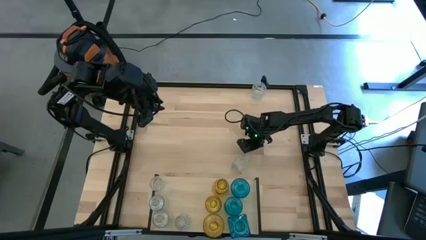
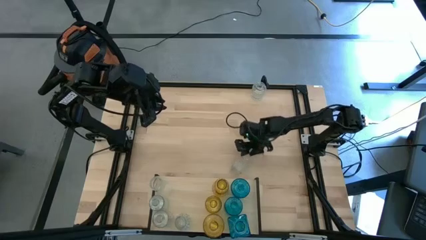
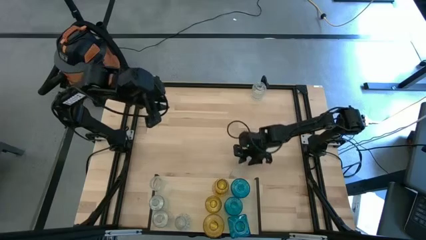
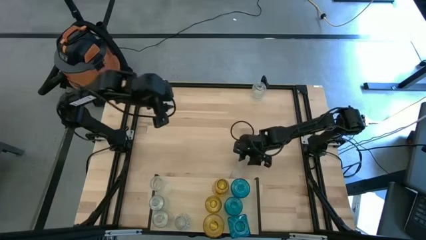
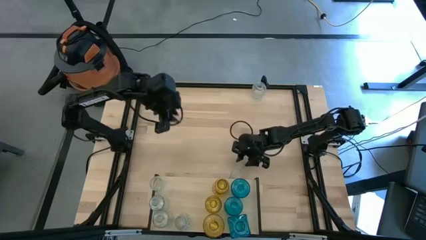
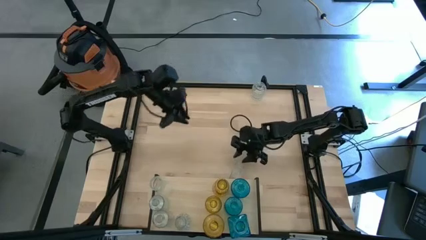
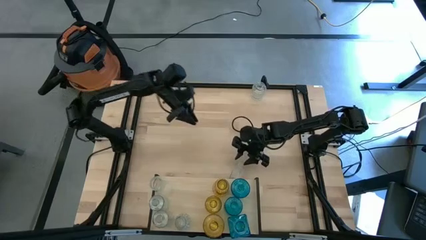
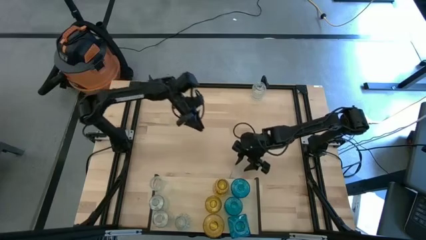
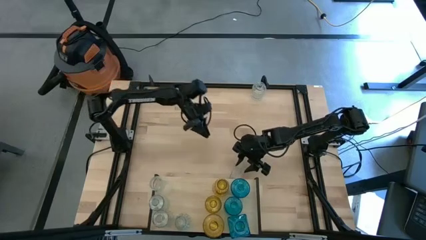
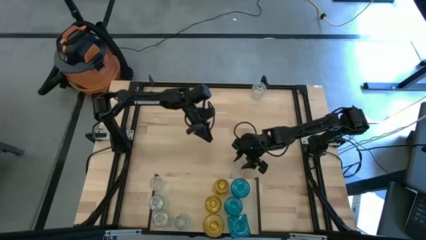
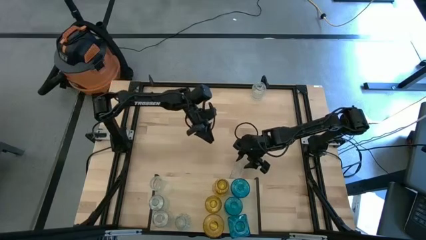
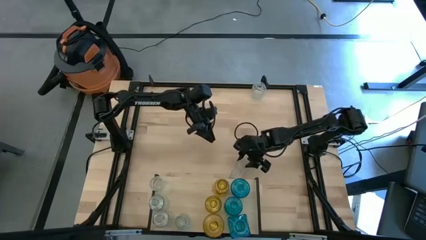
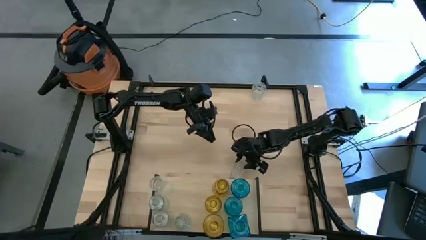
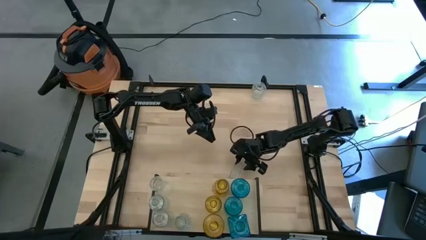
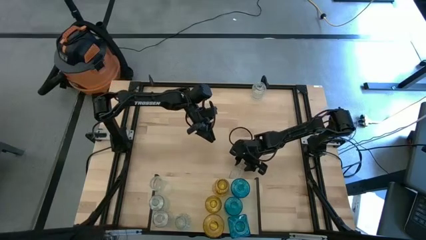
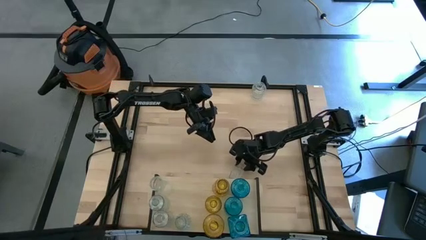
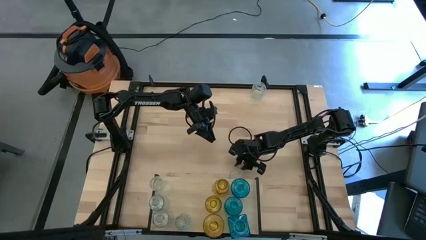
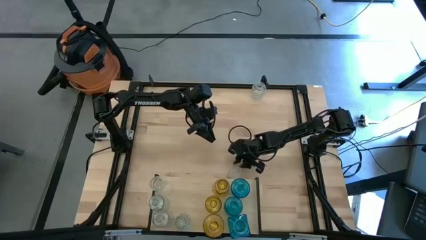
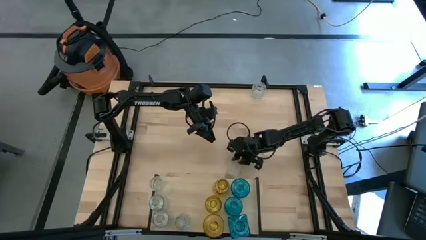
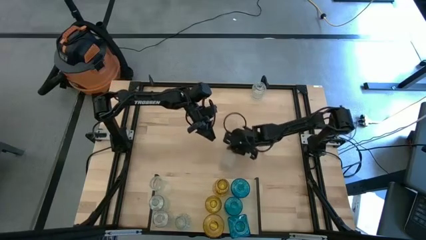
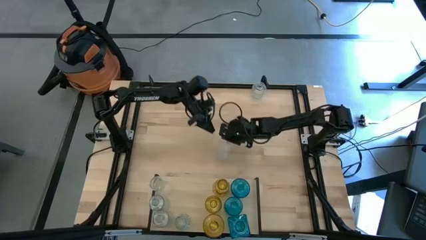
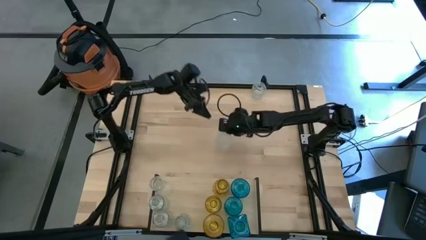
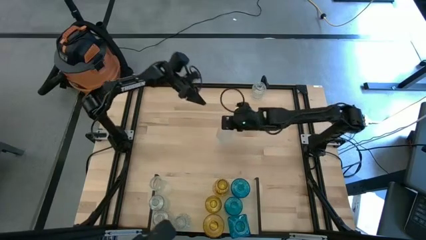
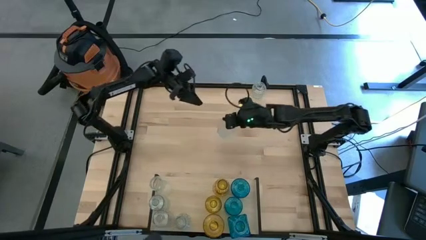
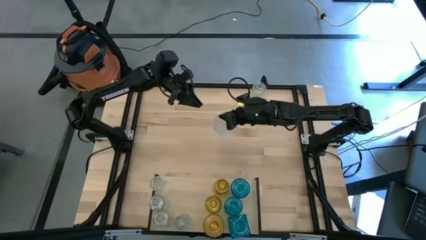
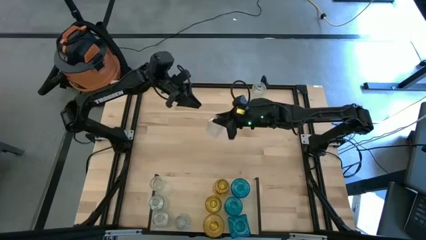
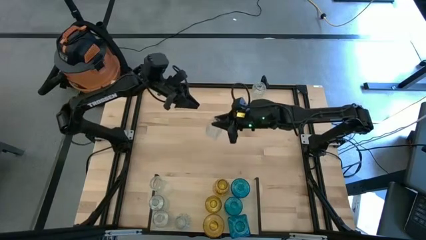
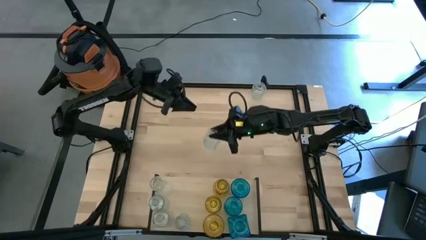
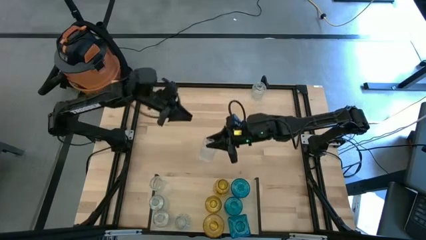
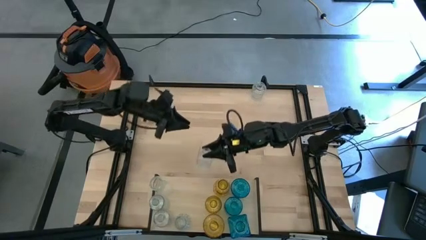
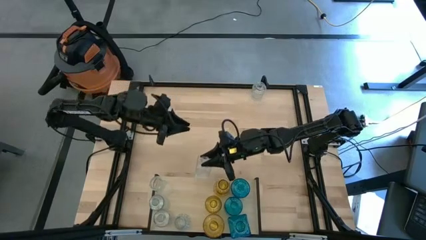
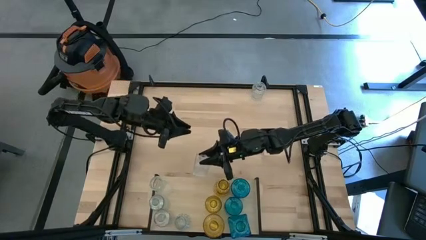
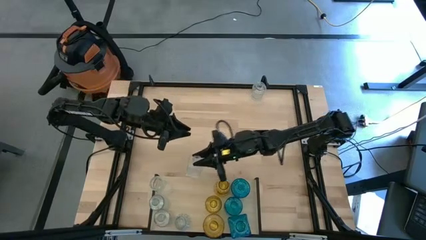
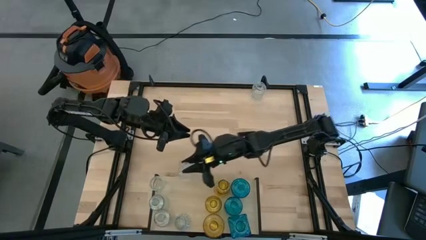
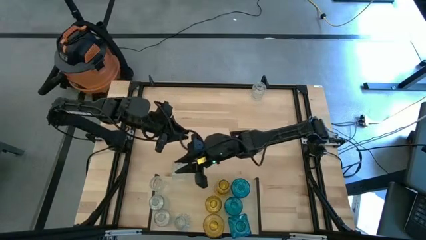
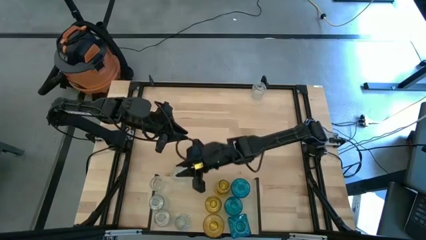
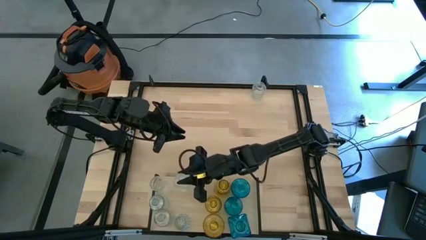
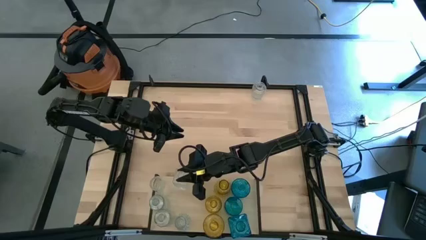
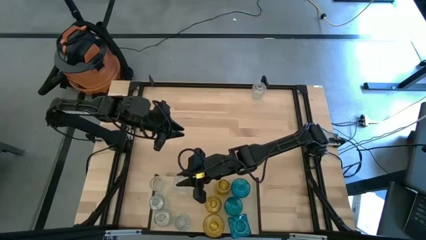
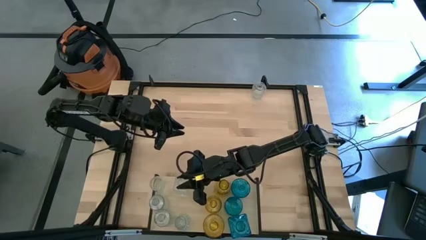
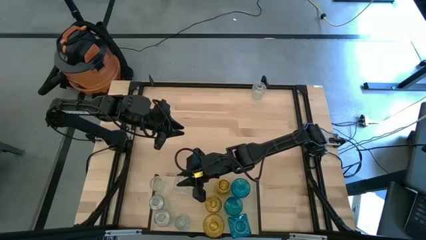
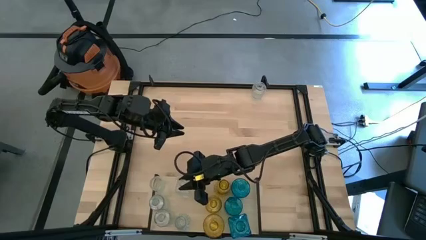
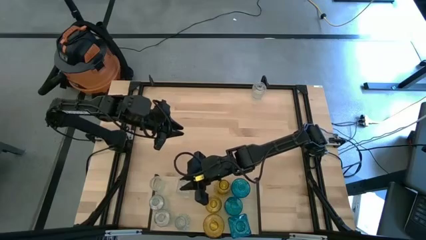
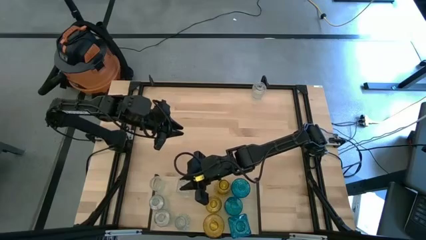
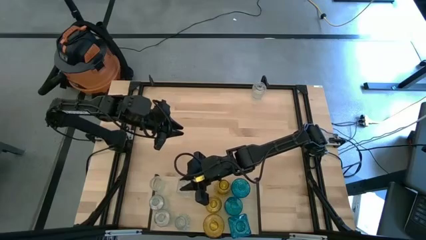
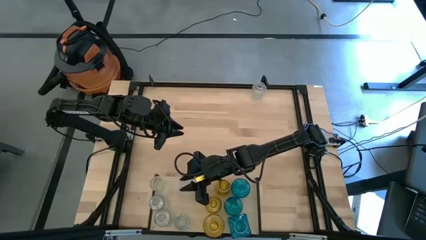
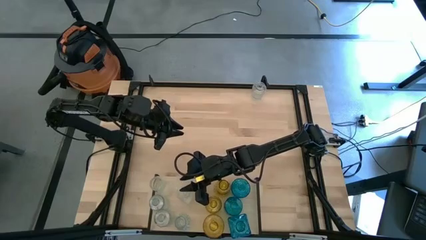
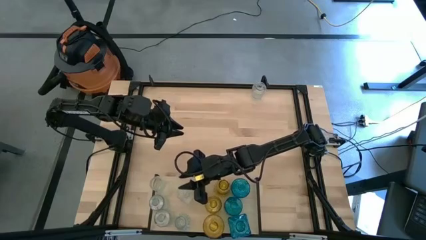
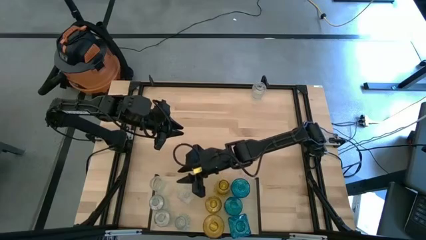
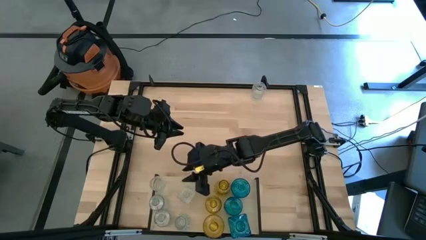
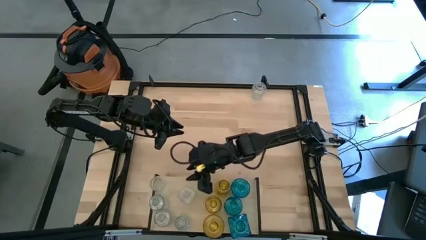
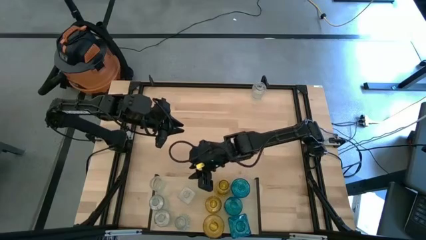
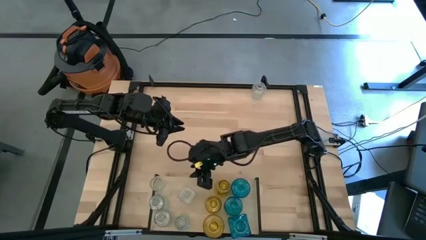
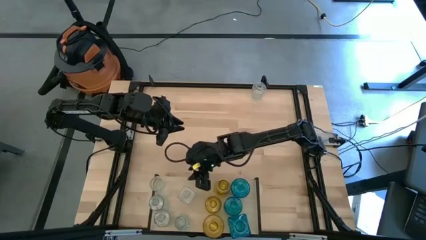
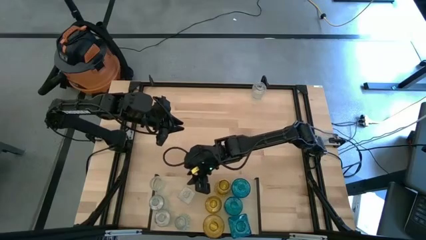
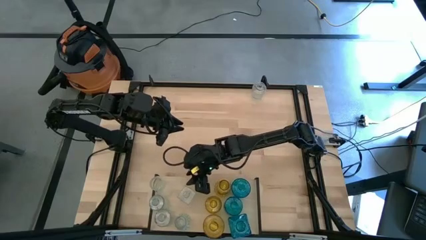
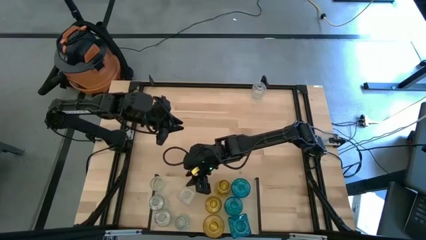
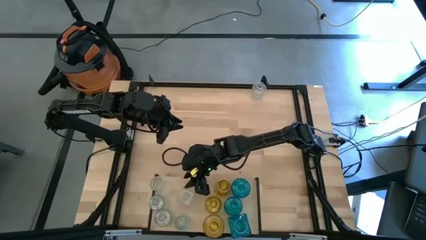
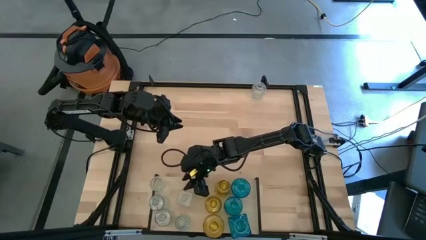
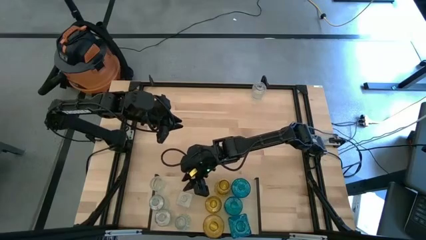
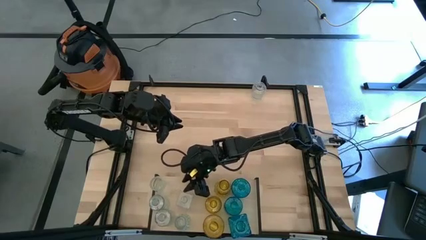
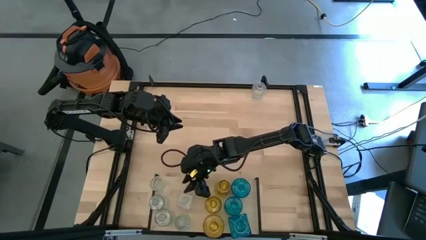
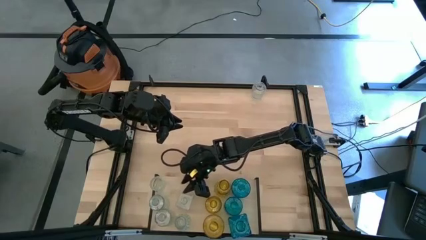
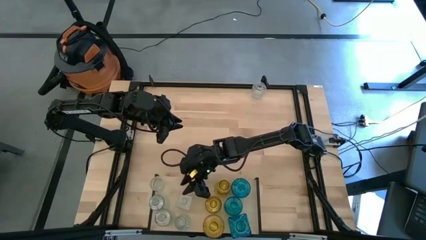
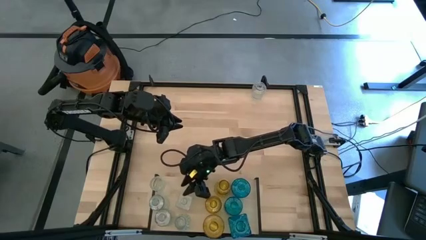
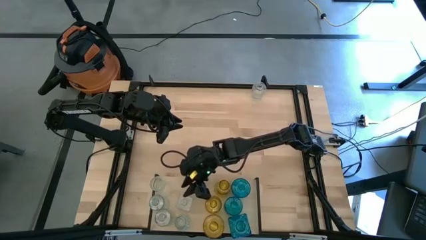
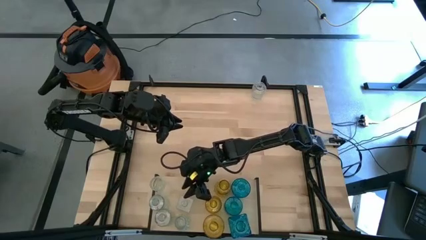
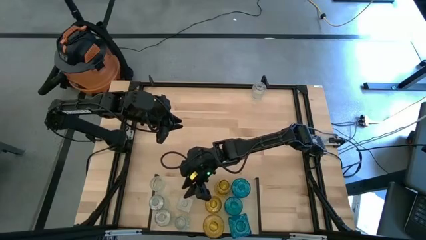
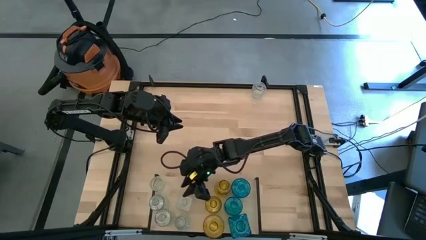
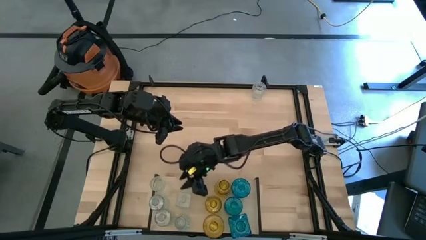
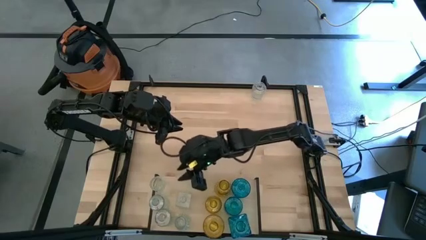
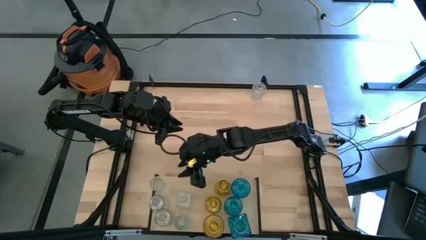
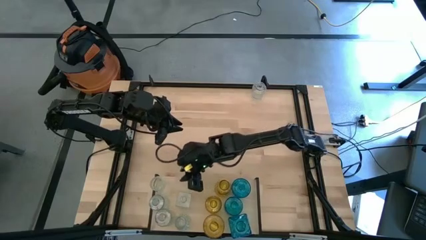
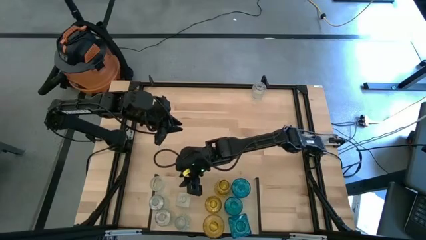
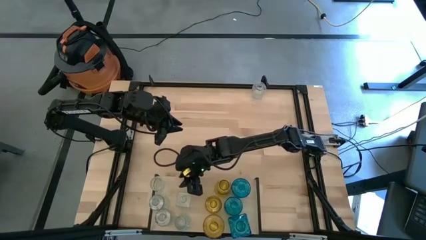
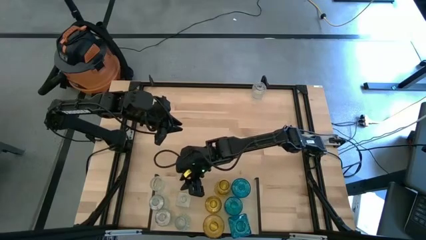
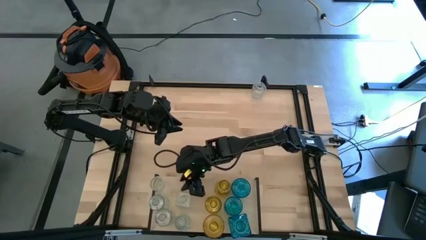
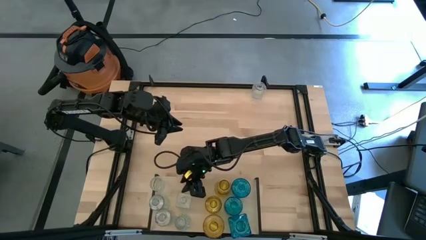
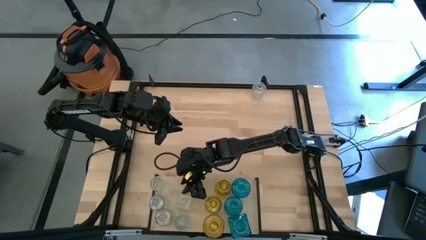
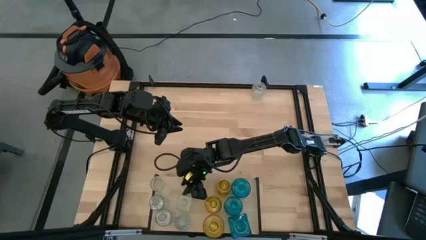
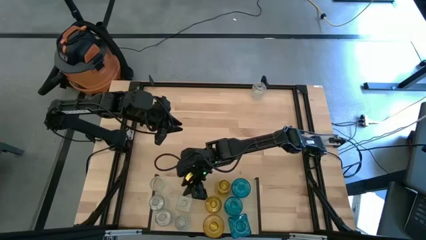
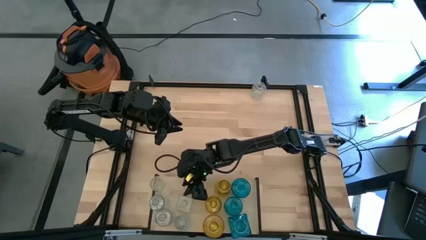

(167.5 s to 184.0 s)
Task: sort vases onto shelf
Put the transparent vase on the shelf aligned with the other transparent vase
